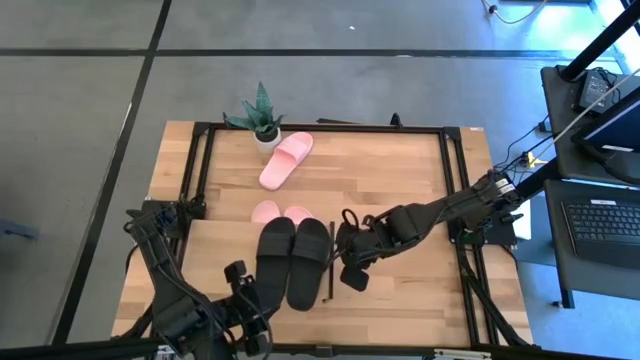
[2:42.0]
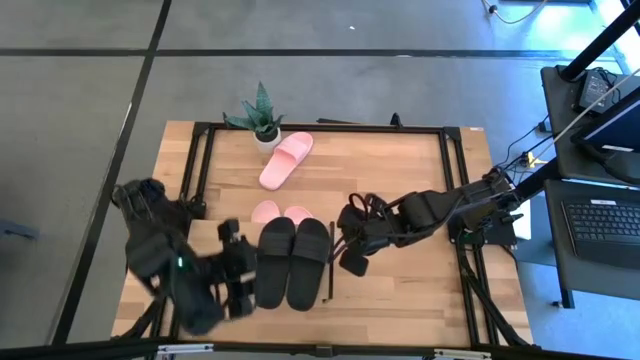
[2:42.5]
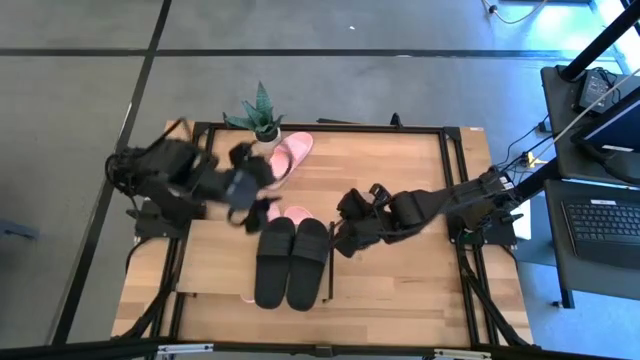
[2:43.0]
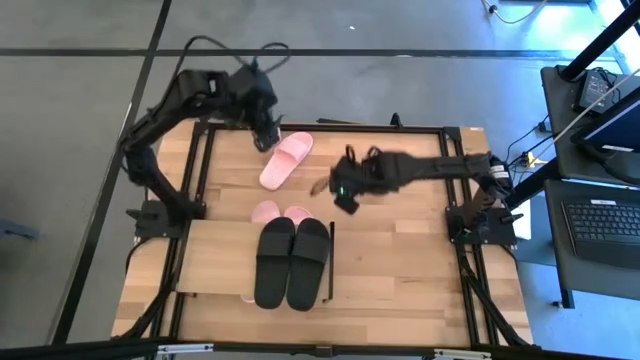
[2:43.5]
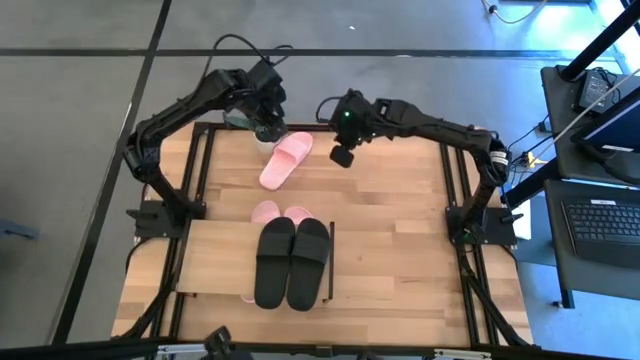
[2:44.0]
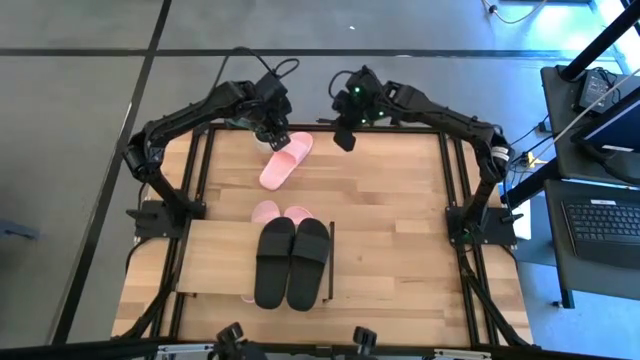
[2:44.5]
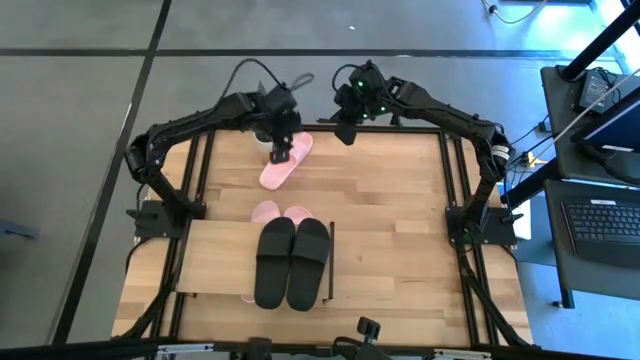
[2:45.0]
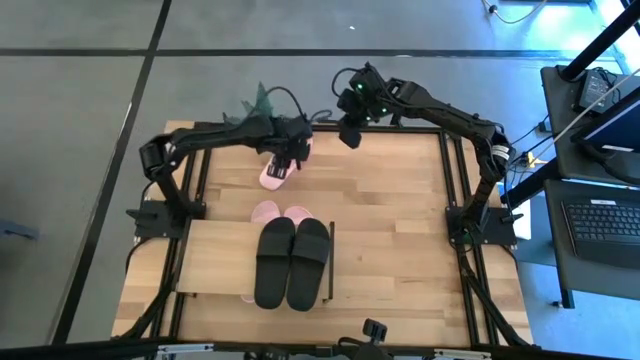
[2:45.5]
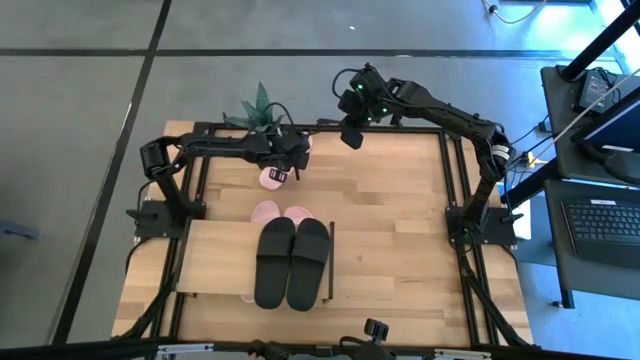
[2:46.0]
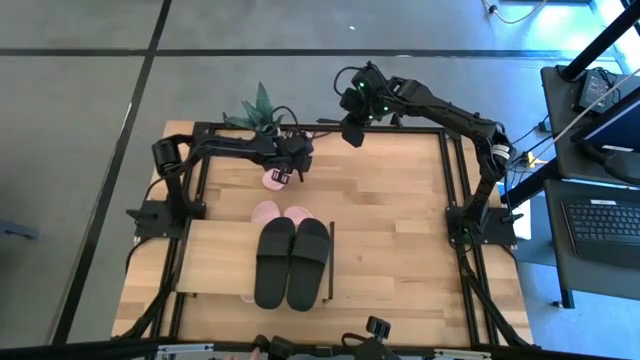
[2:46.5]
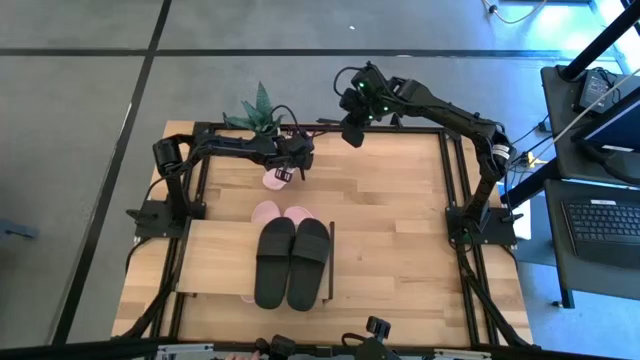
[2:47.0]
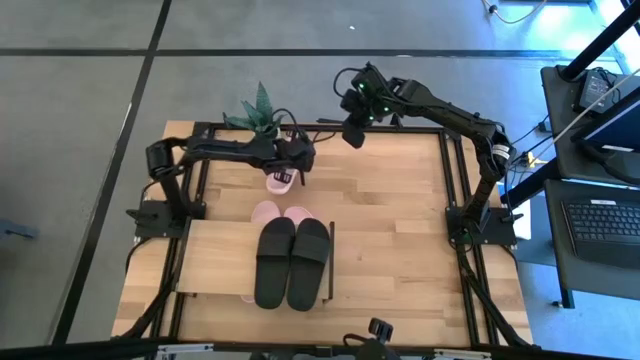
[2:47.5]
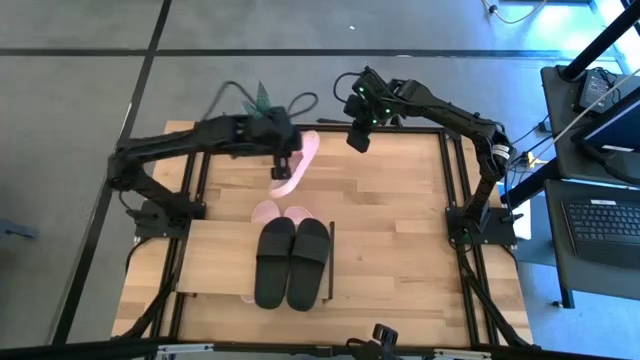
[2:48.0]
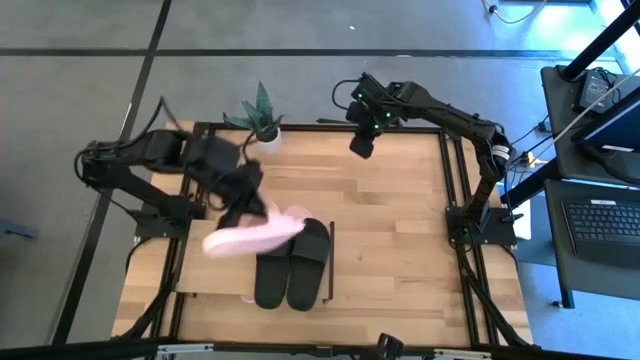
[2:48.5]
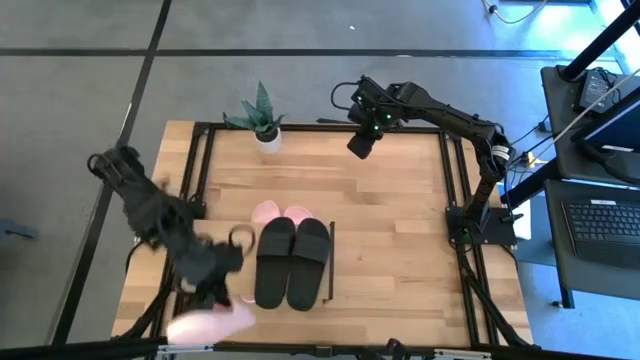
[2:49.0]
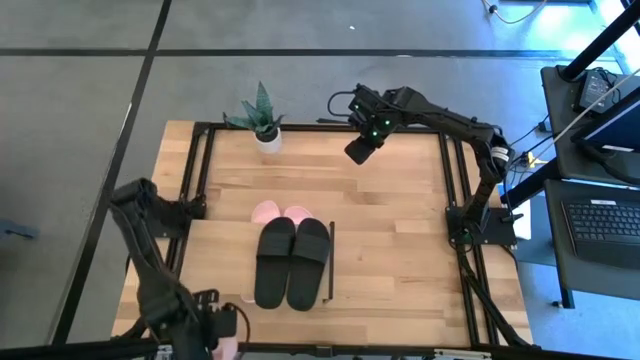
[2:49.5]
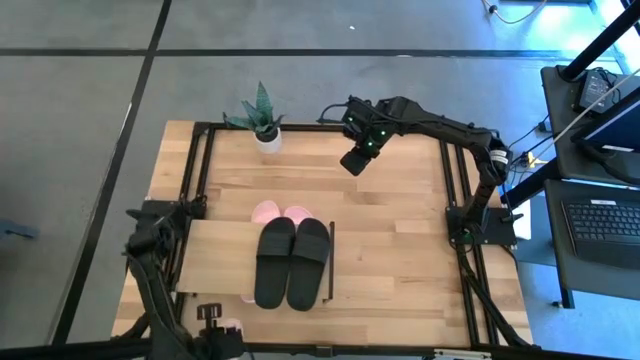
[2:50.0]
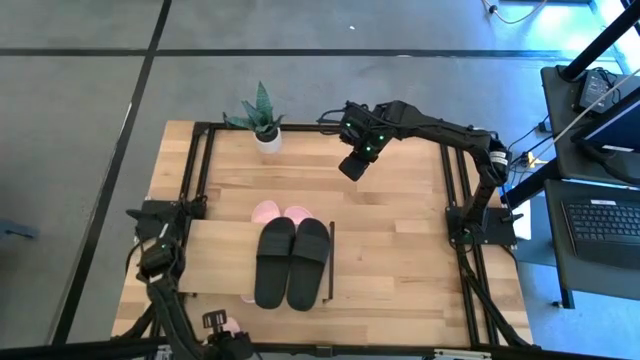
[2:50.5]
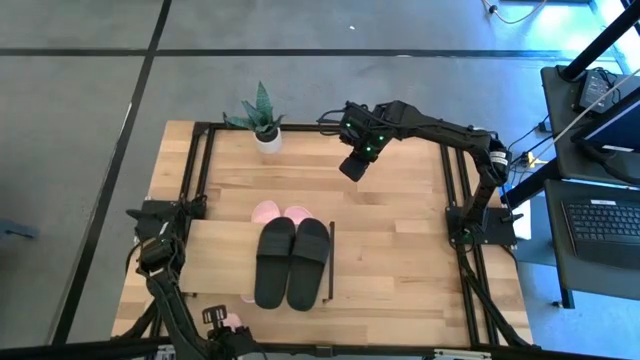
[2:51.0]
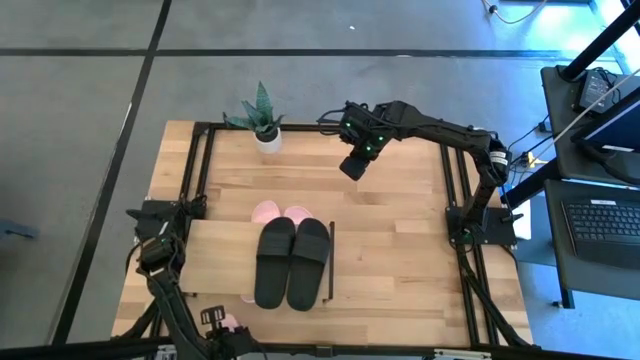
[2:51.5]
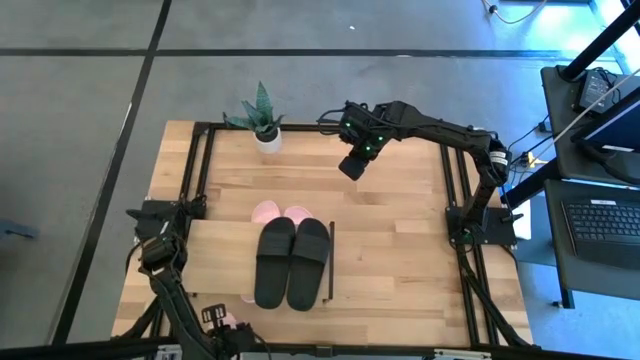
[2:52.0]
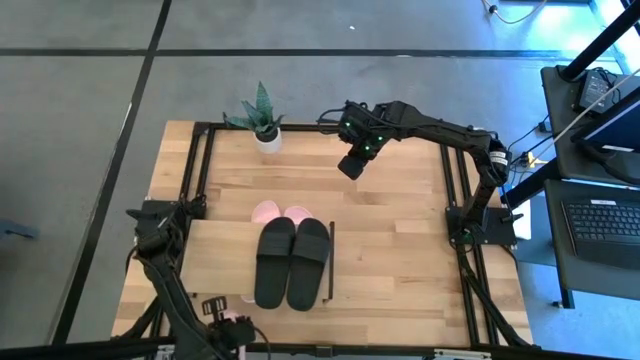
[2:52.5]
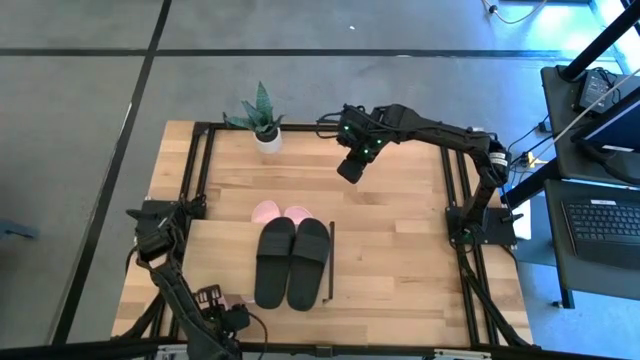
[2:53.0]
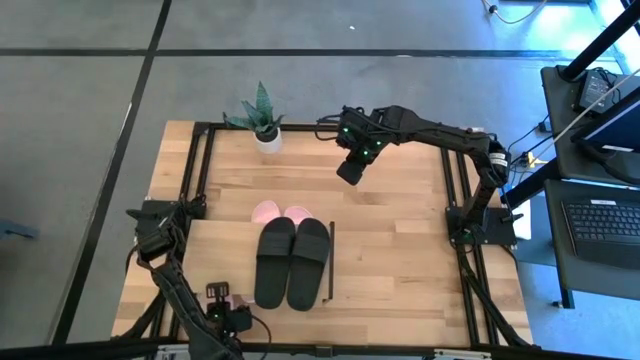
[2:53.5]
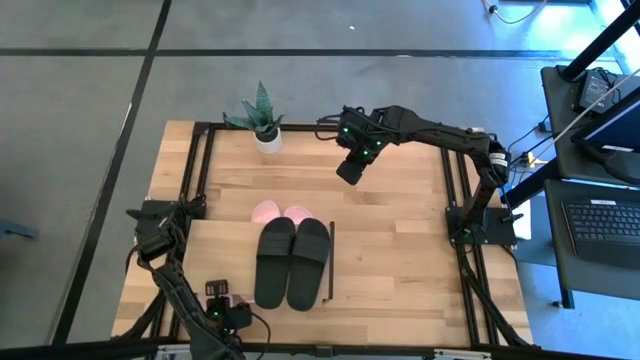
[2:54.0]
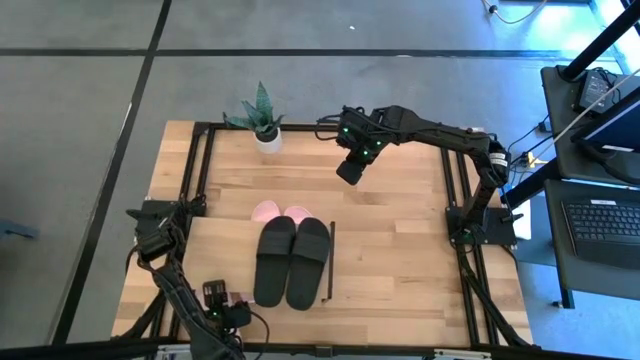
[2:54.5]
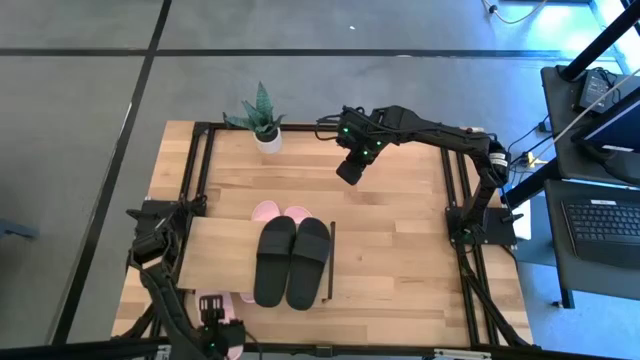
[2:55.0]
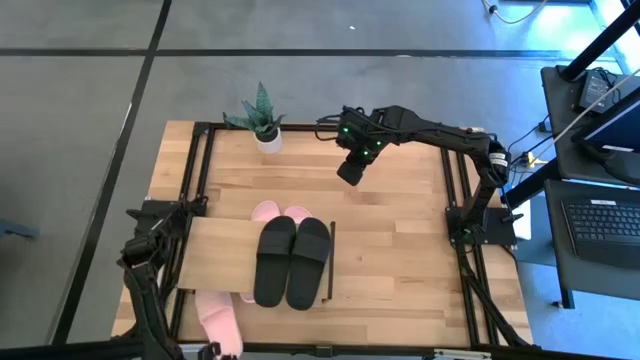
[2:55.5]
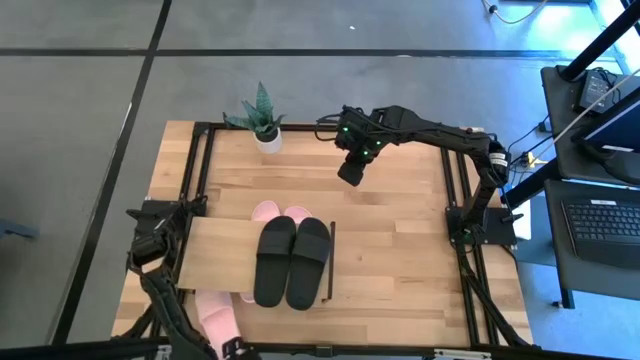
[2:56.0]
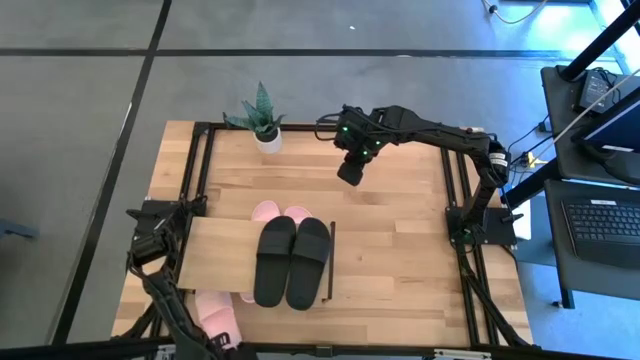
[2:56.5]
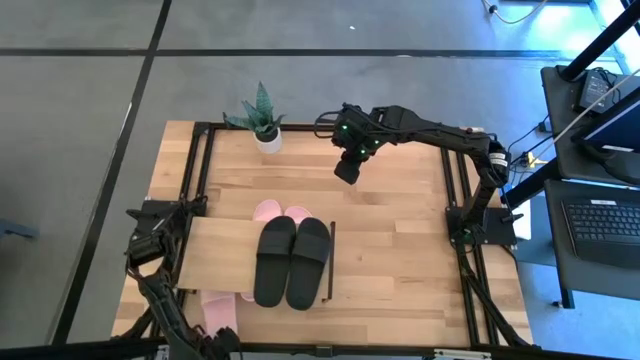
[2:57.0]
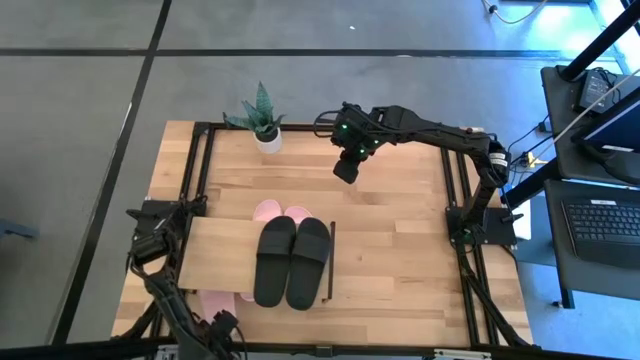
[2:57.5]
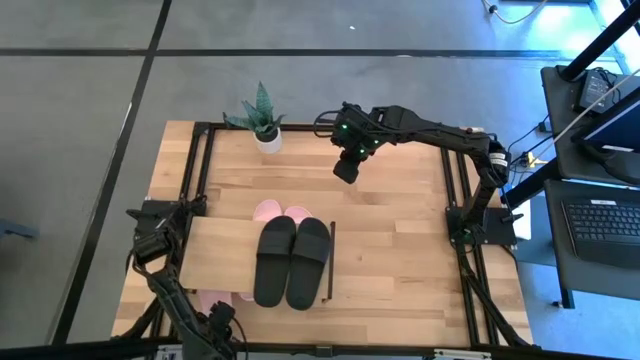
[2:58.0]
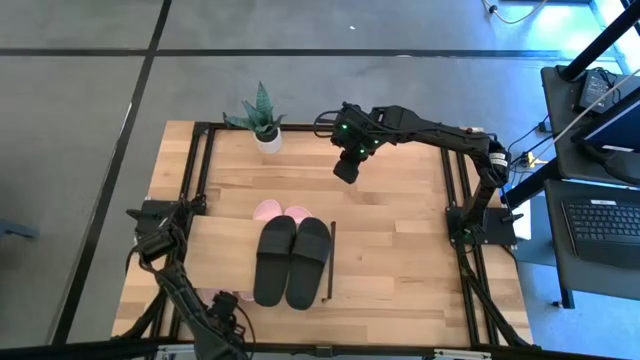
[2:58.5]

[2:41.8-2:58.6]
Task: Pick and place slides into the shelf
Put the pink slide under the shelf

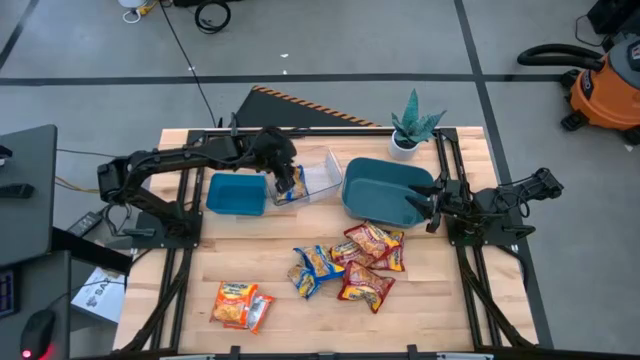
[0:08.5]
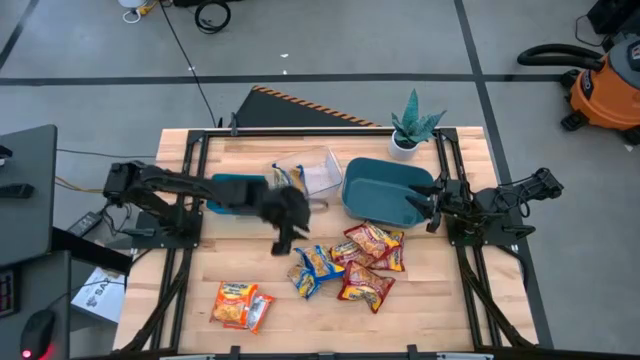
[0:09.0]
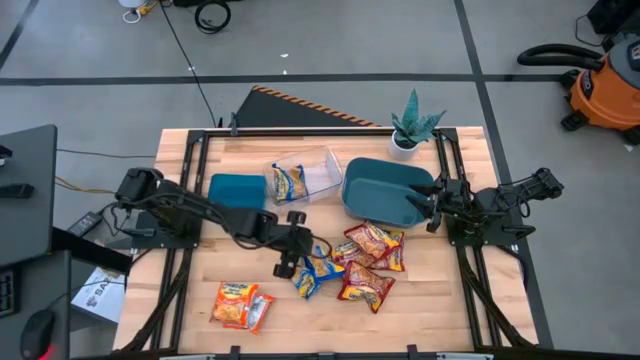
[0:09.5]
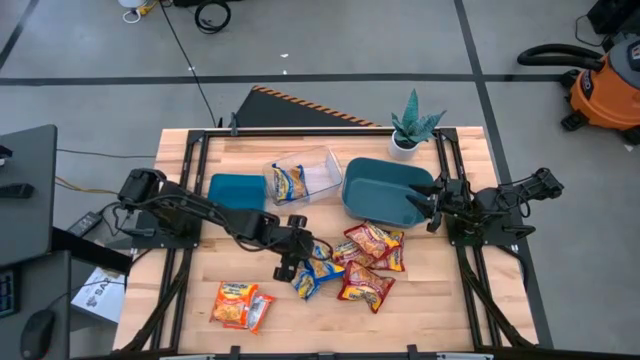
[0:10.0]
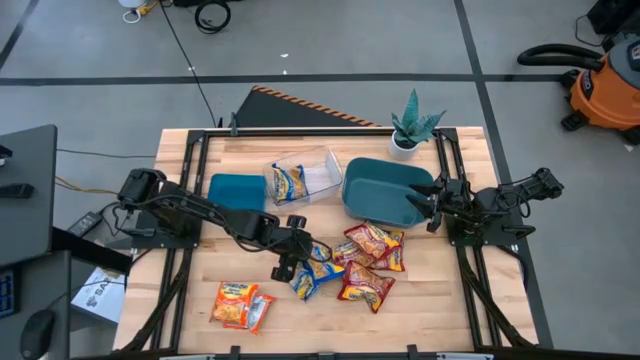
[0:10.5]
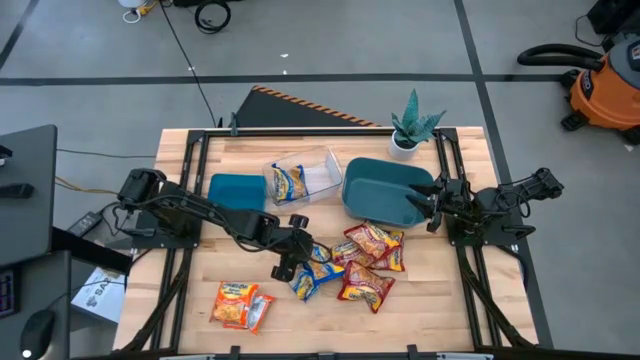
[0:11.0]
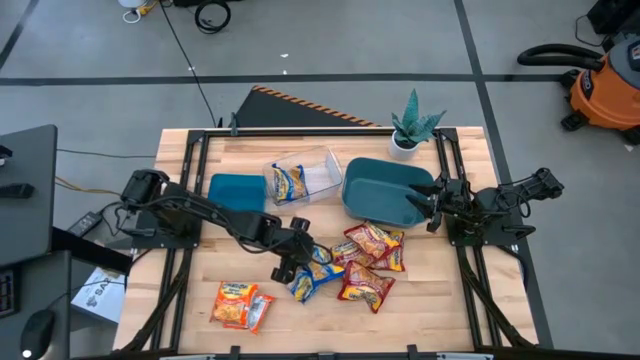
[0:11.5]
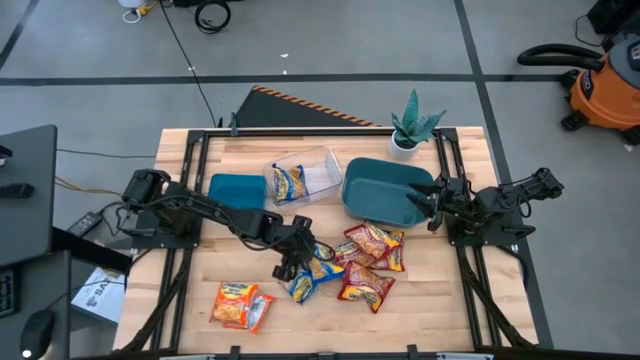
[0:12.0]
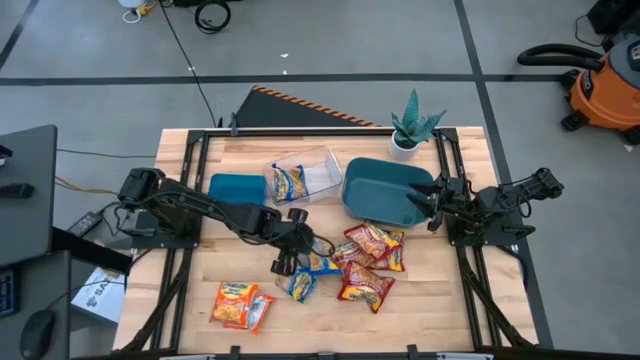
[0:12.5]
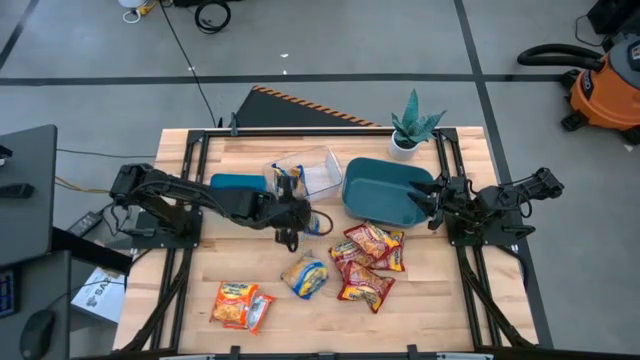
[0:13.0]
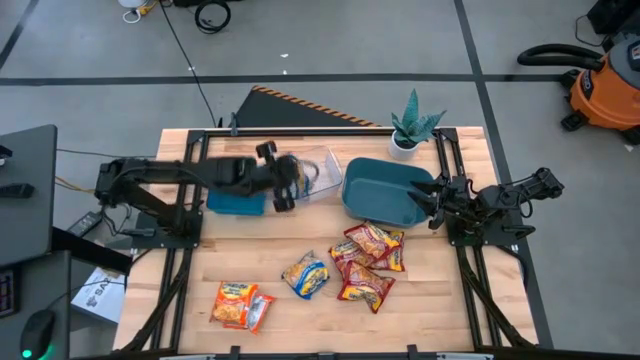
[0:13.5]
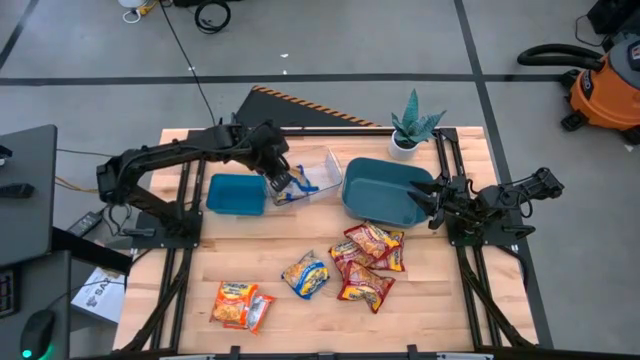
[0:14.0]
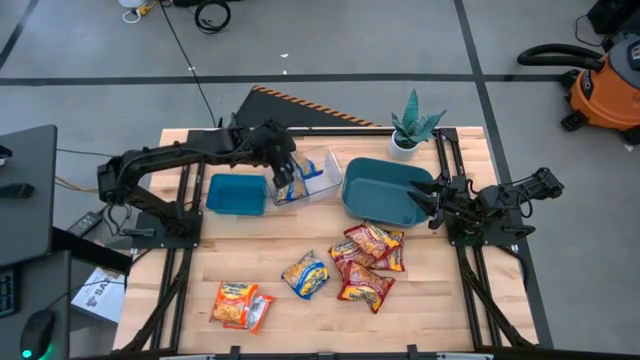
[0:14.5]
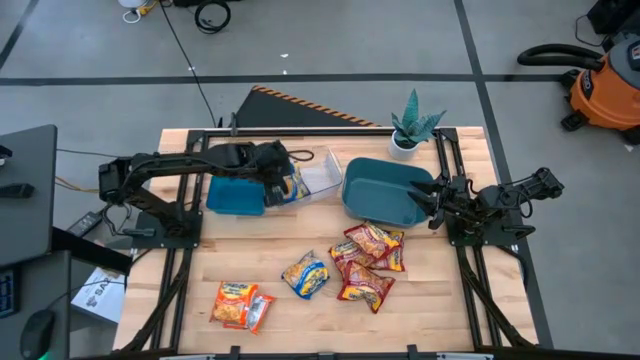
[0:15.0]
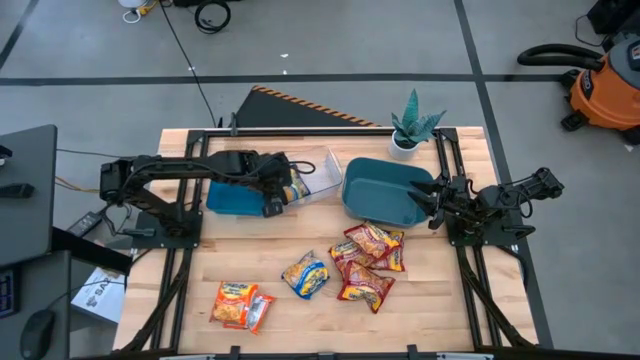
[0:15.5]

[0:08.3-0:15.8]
Task: Sort Maruchan noodles
Put the blue noodle pack into the transparent bin
